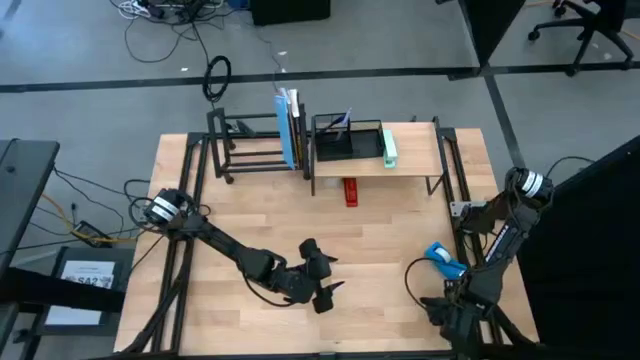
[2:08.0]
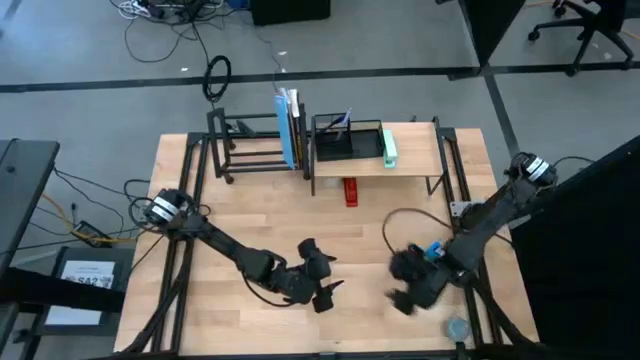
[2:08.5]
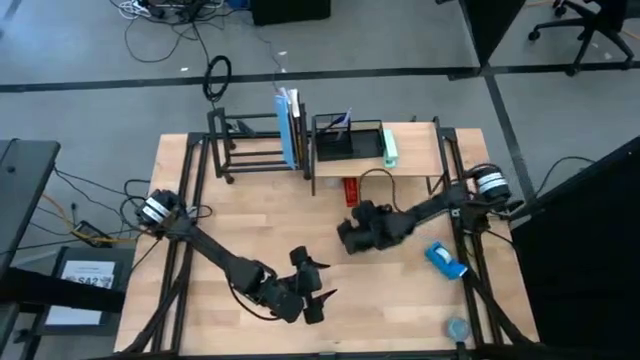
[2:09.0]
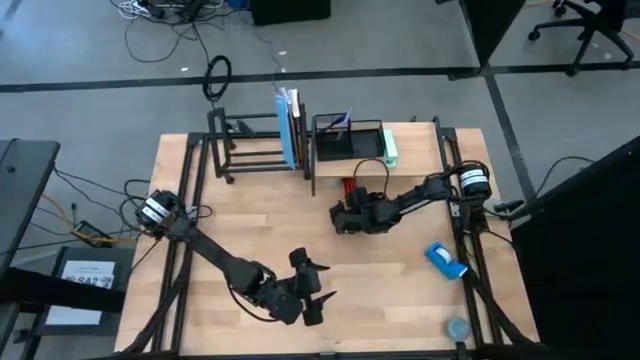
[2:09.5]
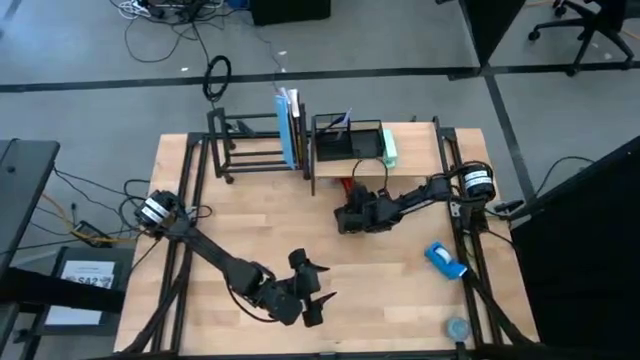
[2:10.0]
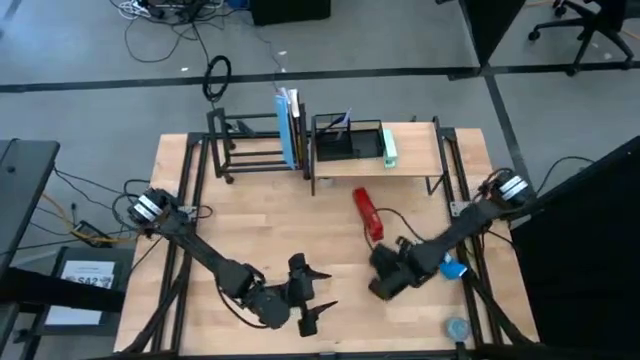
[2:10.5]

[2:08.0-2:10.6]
Task: Stock shelves
Remove the red stapler from under the shelf

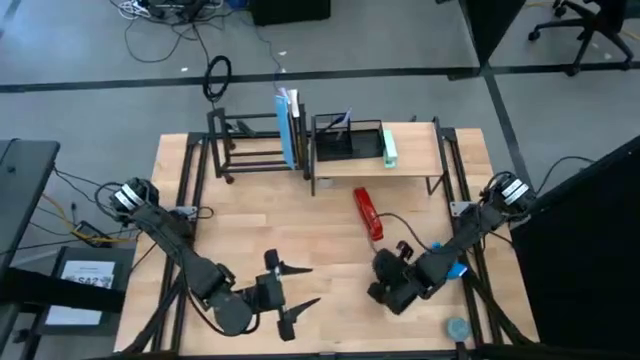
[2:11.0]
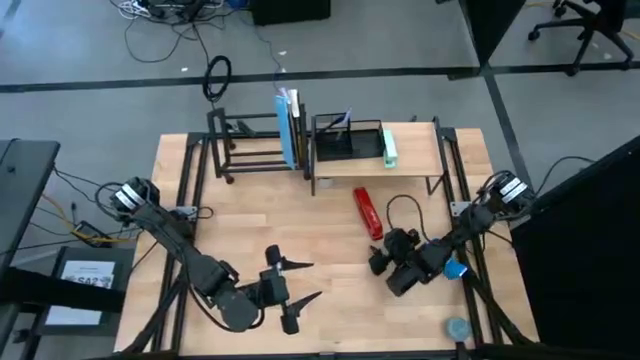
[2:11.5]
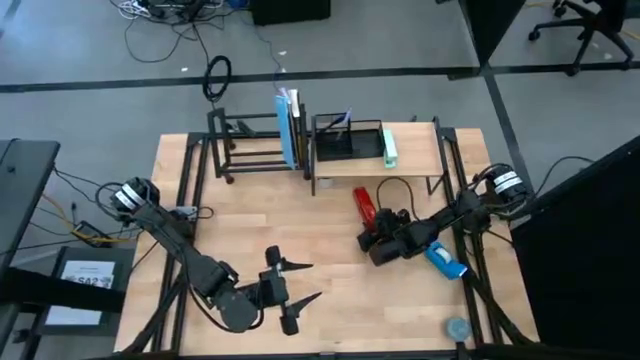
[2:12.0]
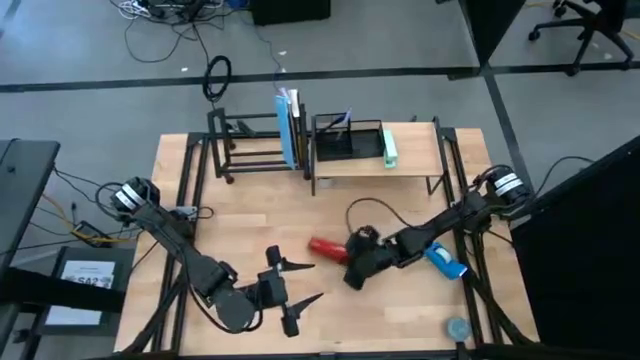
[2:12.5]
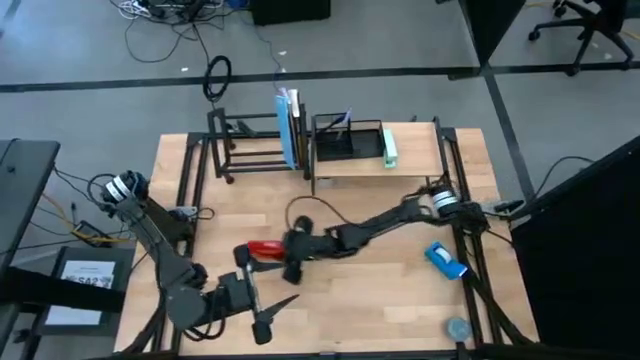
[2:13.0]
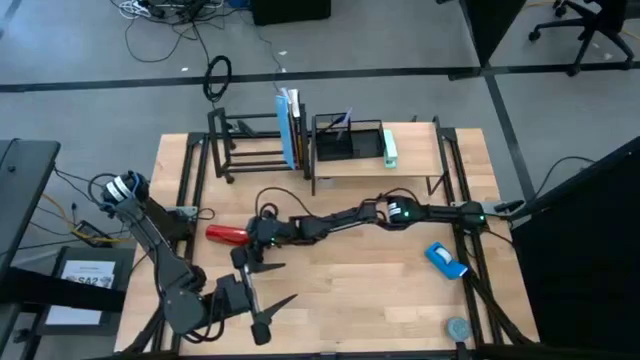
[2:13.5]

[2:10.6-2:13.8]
Remove the red stapler from under the shelf

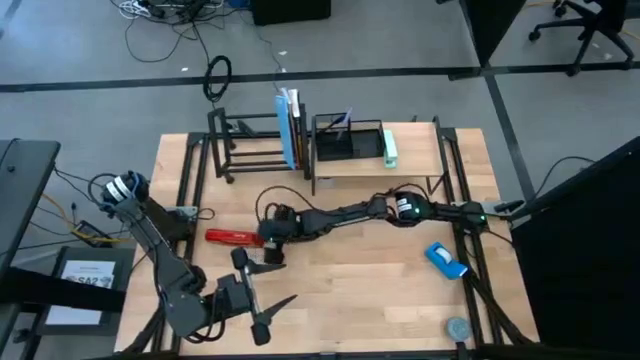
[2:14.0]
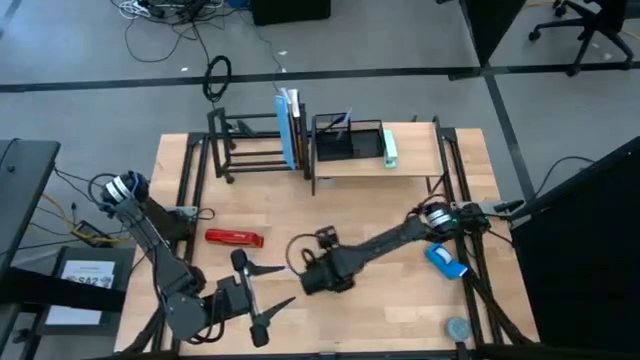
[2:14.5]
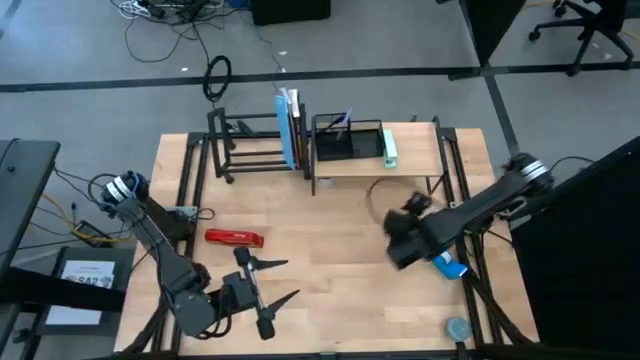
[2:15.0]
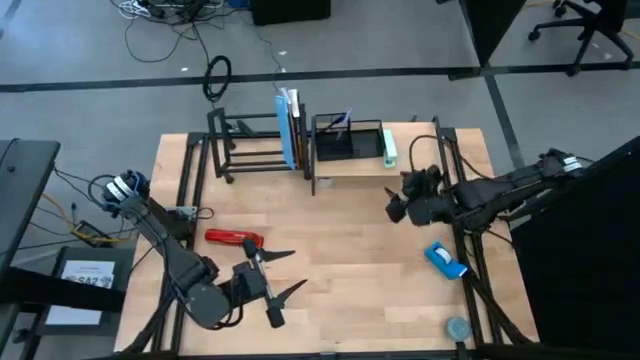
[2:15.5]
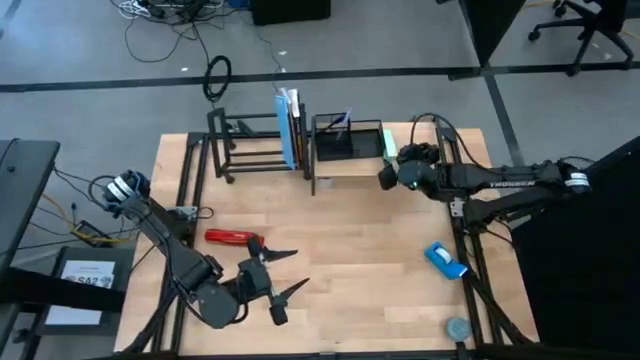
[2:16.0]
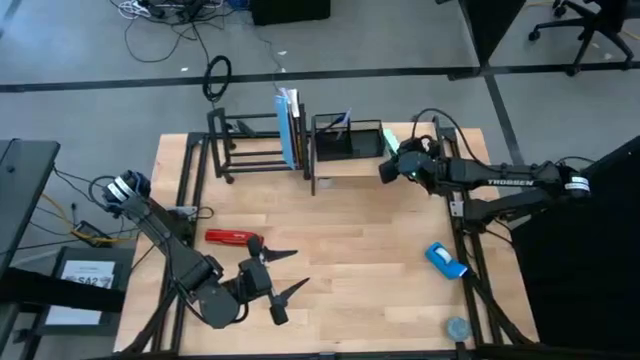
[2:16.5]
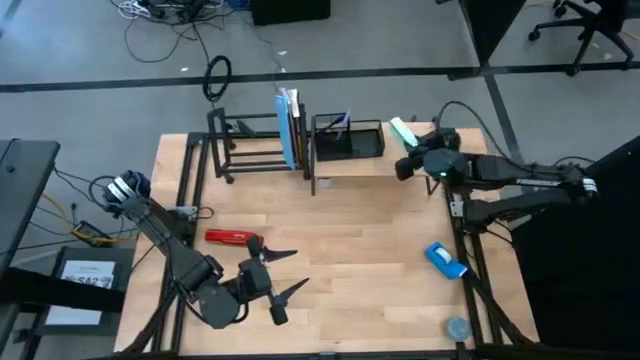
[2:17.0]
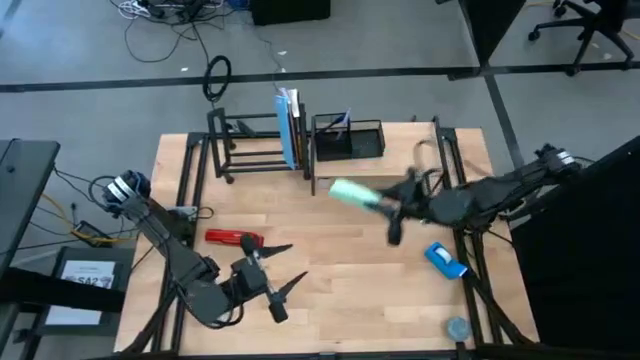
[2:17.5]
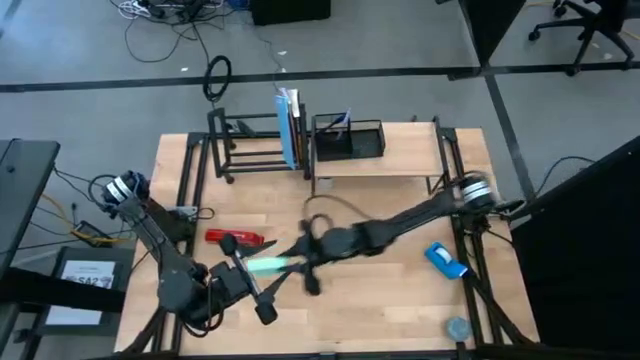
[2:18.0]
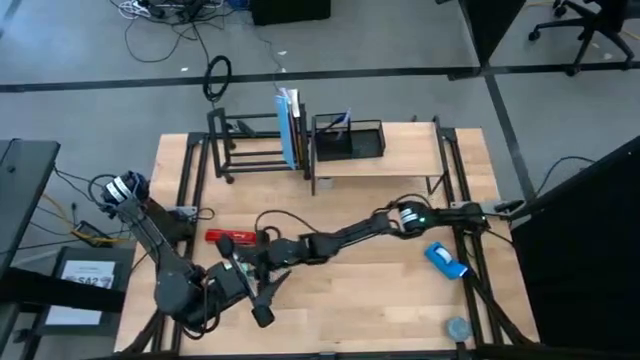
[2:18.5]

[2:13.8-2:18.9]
Remove the blue stapler from the shelf

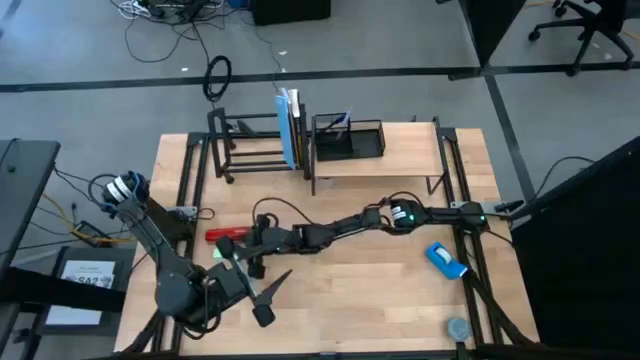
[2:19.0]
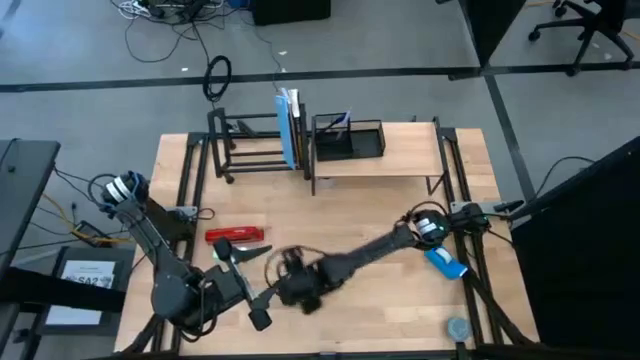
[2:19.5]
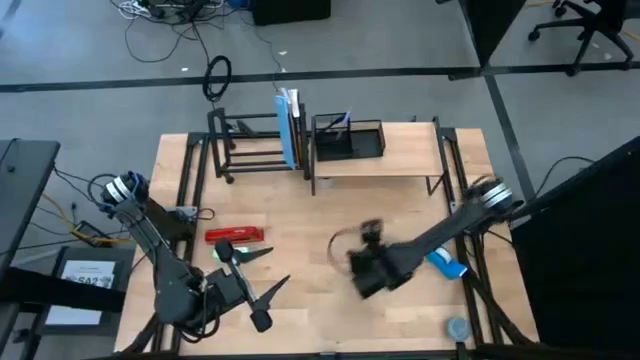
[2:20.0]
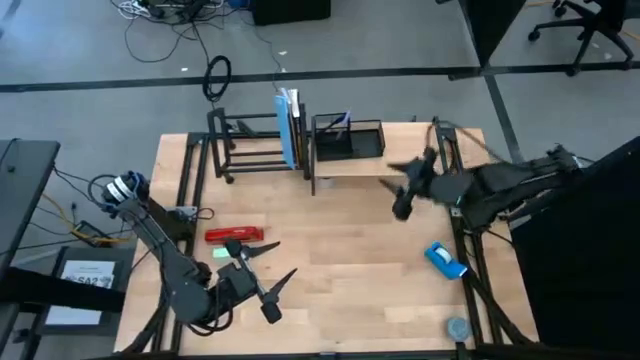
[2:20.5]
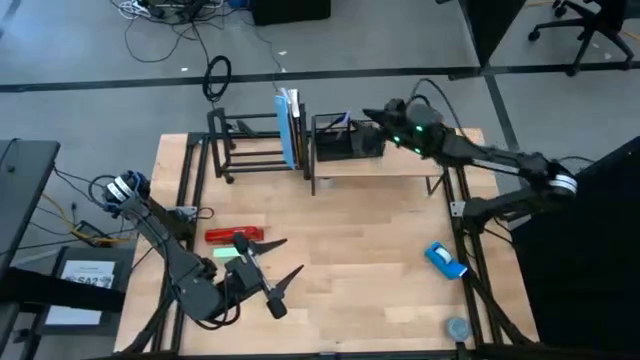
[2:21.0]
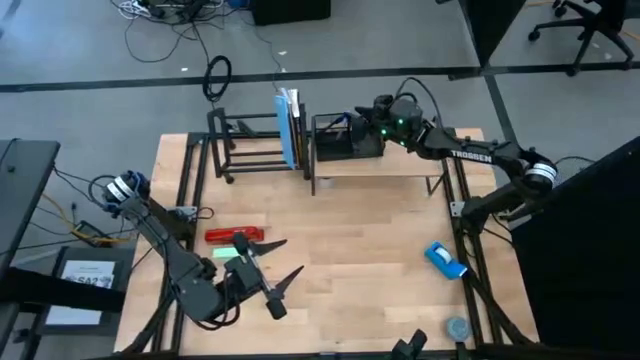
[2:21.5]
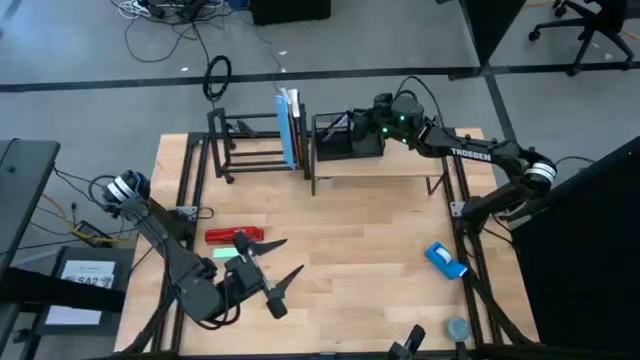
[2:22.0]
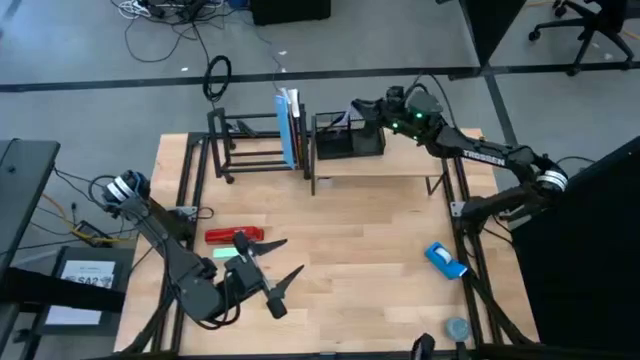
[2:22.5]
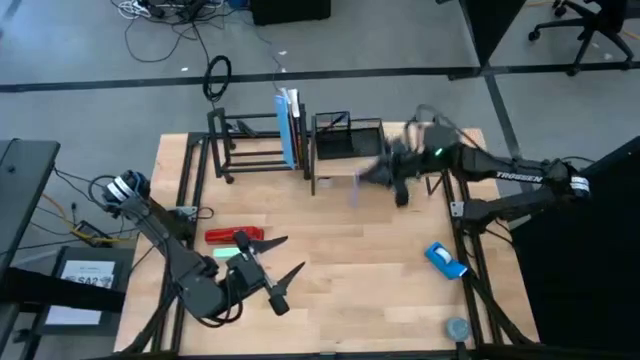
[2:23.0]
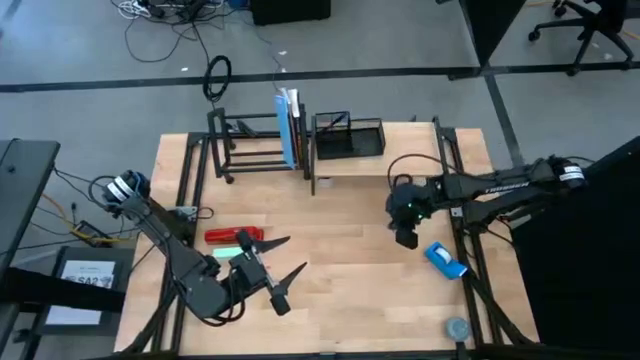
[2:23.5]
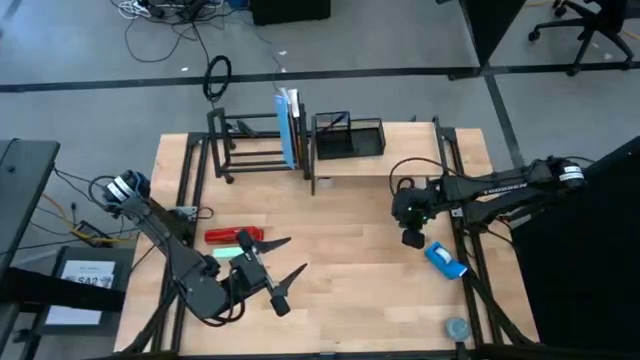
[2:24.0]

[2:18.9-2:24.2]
Remove the violet pen from the pen holder of the black desk organizer

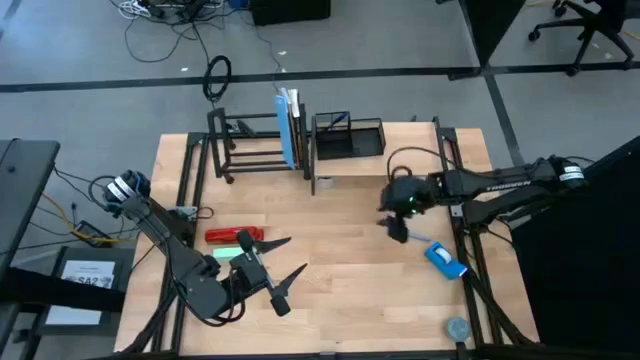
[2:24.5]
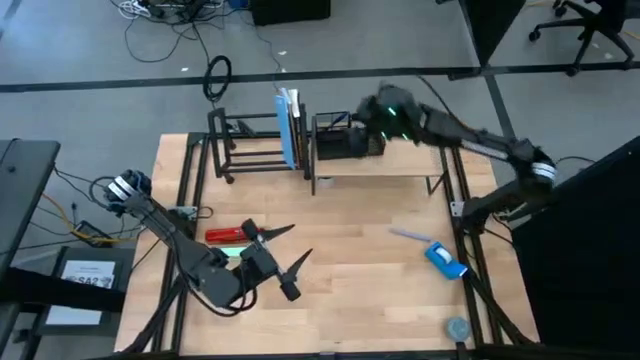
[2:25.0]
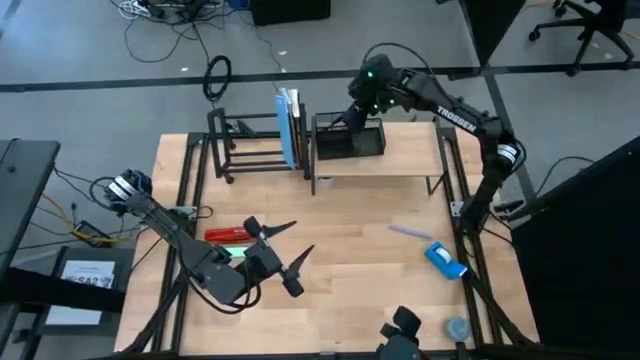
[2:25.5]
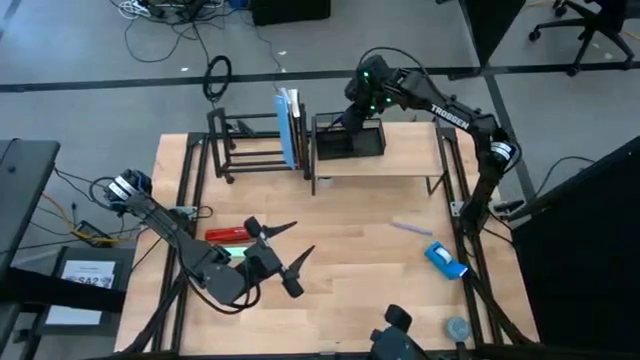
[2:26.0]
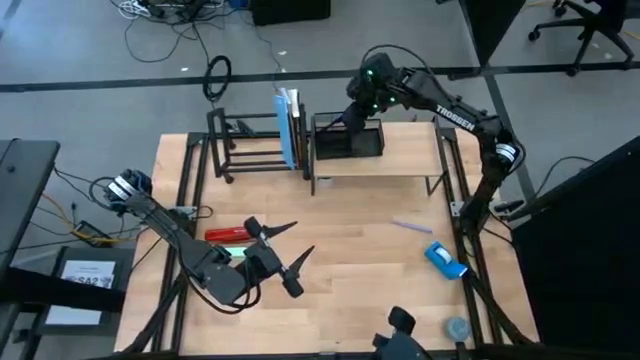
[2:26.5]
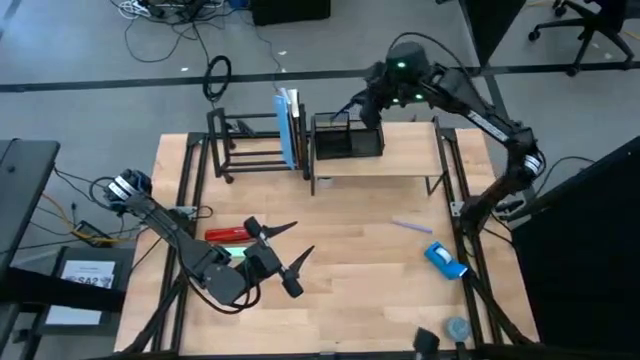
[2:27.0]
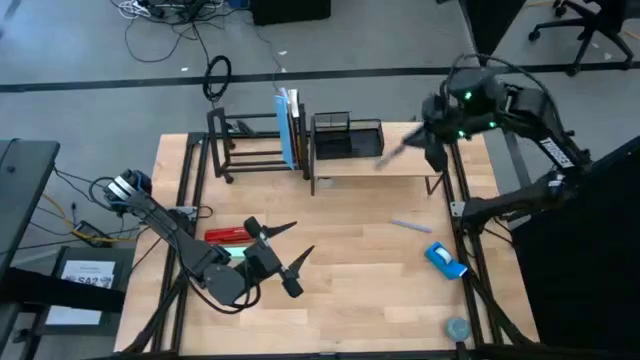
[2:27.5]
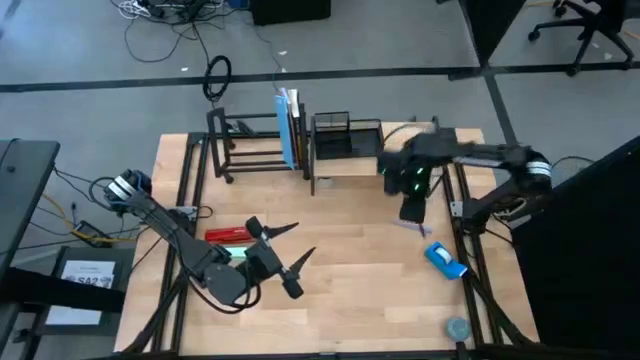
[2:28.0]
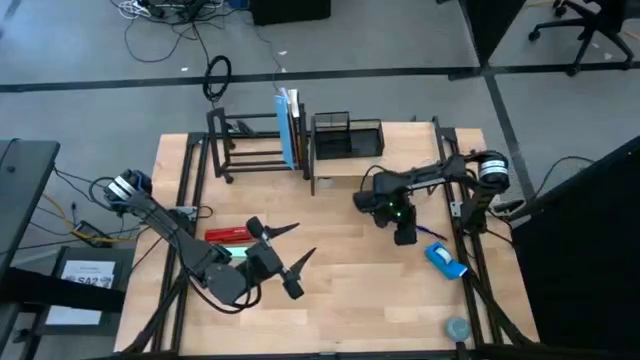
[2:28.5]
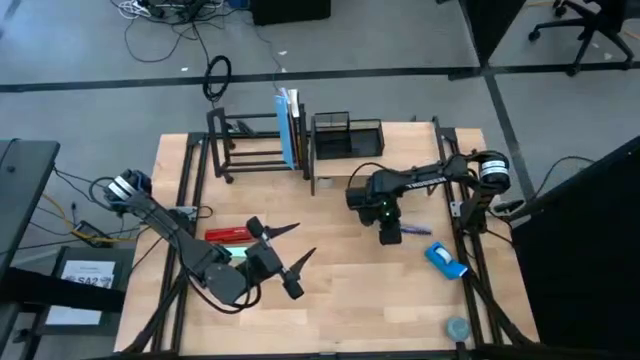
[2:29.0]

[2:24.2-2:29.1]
Remove the blue pen from the pen holder of the black desk organizer
